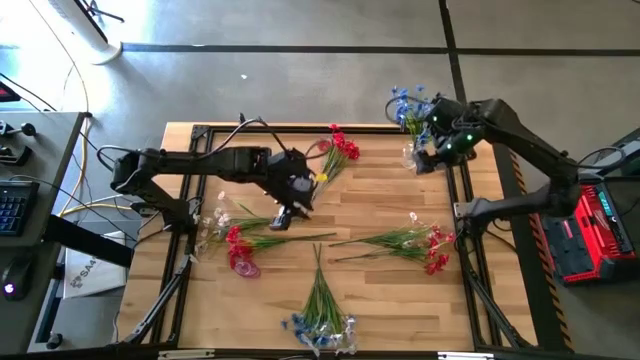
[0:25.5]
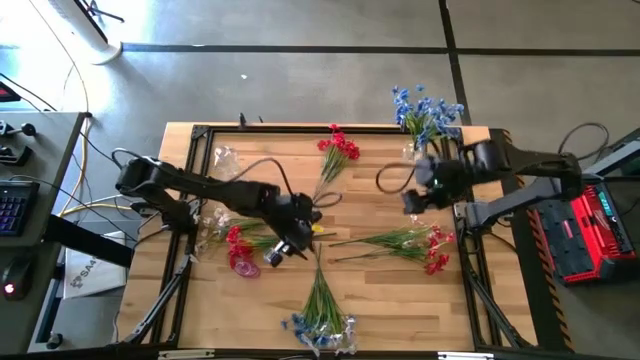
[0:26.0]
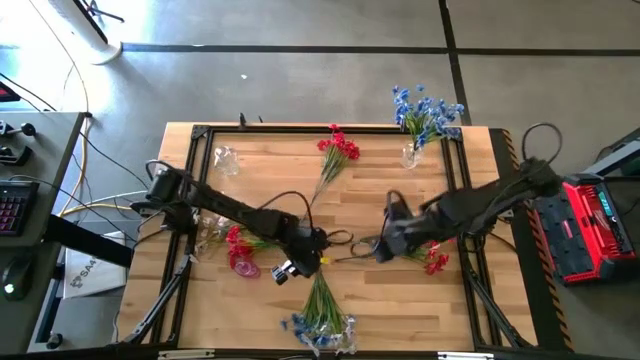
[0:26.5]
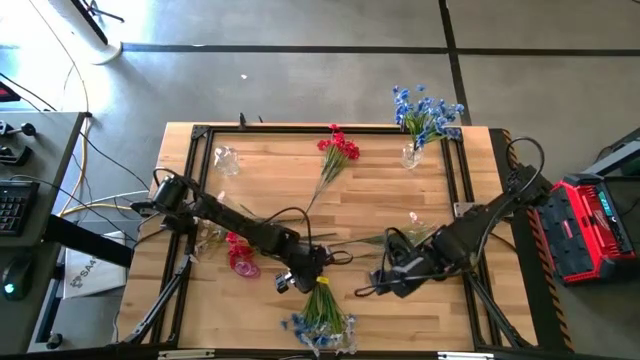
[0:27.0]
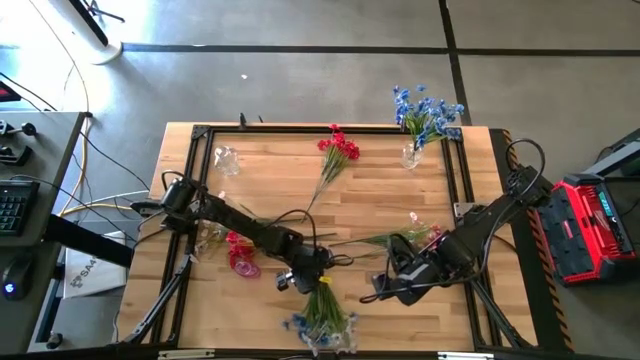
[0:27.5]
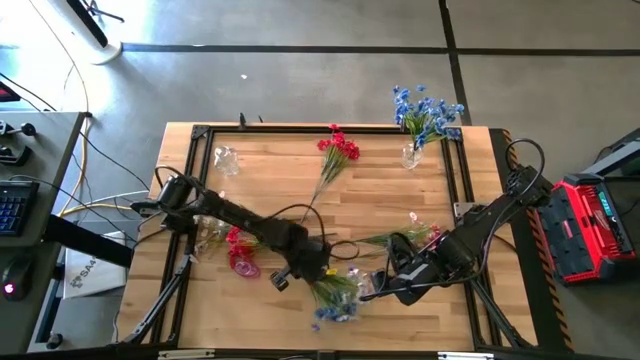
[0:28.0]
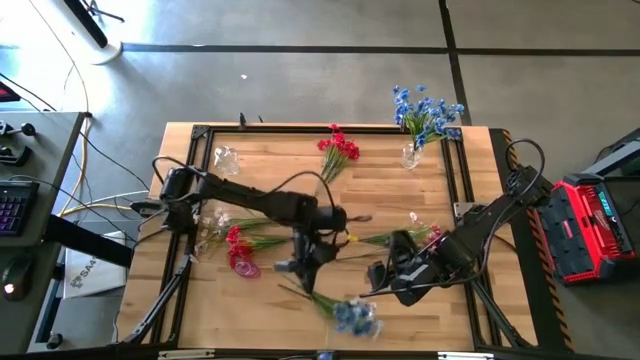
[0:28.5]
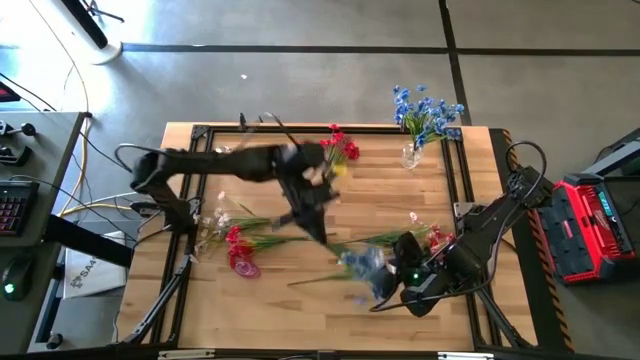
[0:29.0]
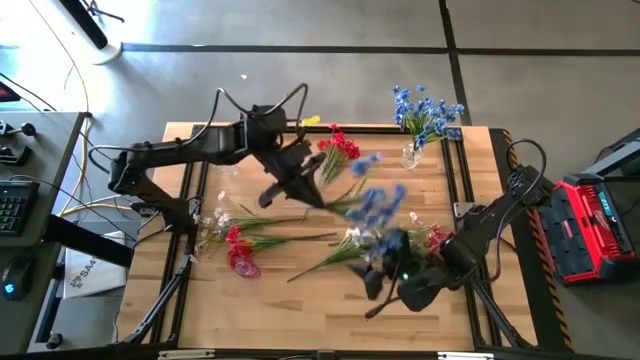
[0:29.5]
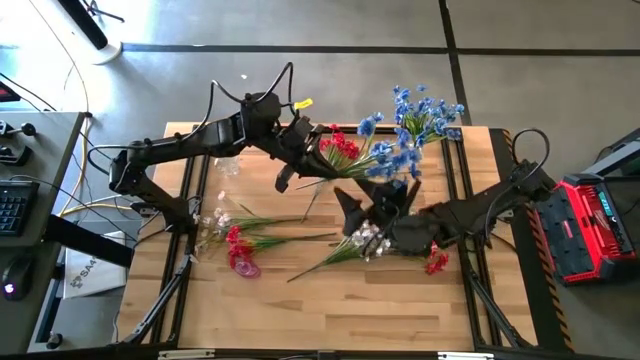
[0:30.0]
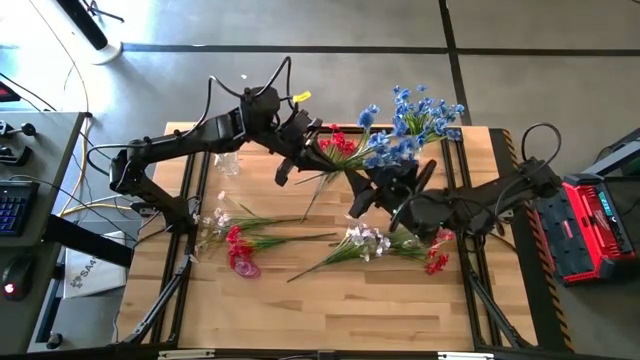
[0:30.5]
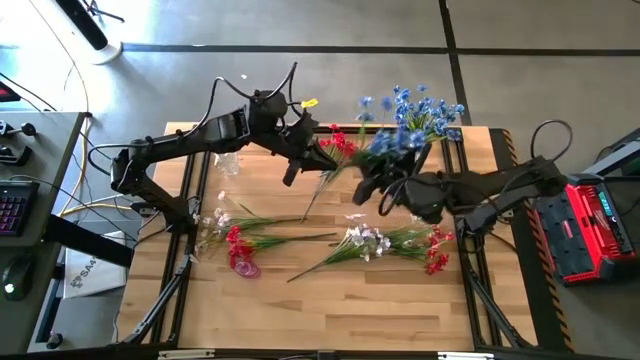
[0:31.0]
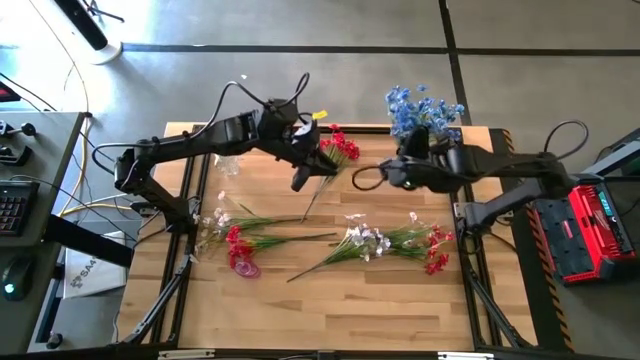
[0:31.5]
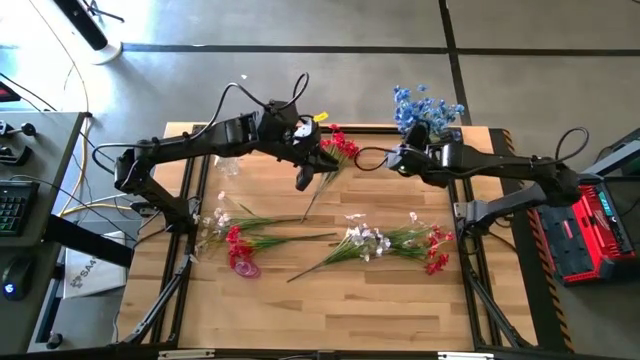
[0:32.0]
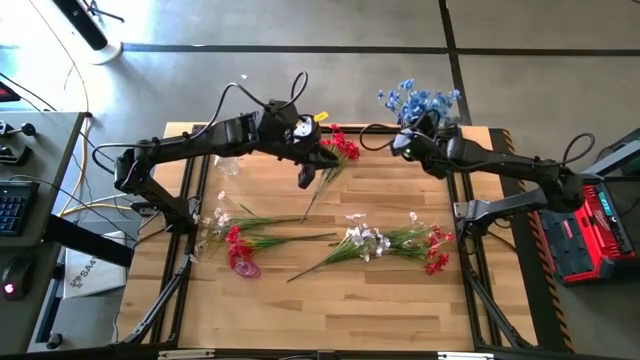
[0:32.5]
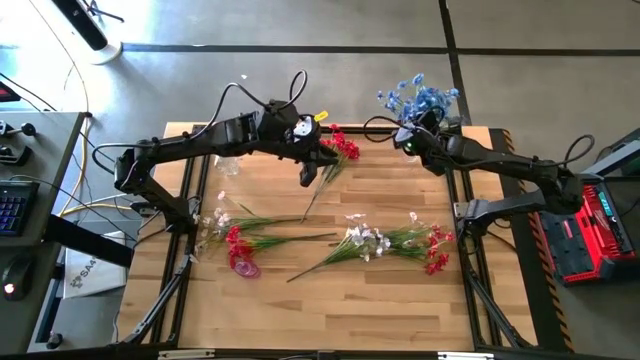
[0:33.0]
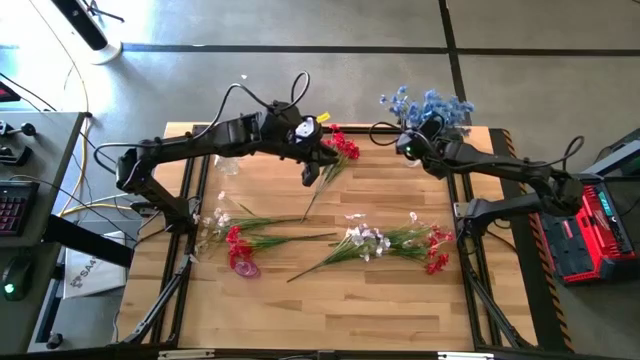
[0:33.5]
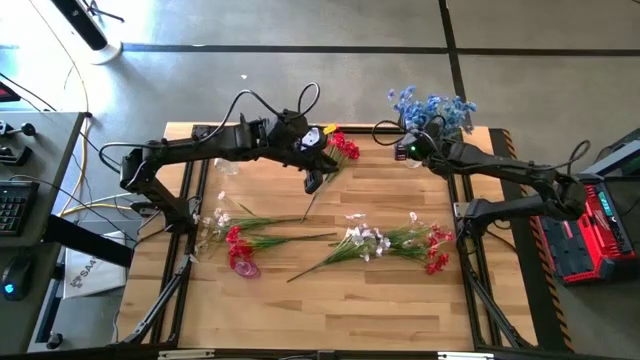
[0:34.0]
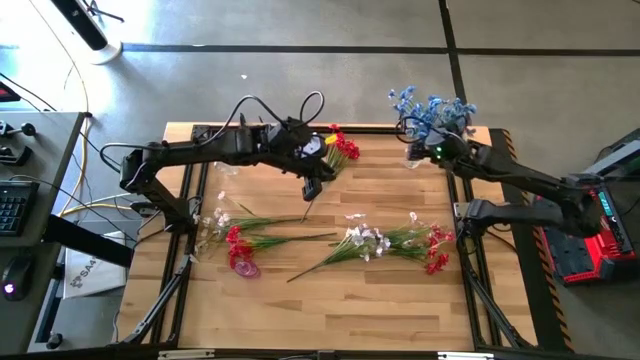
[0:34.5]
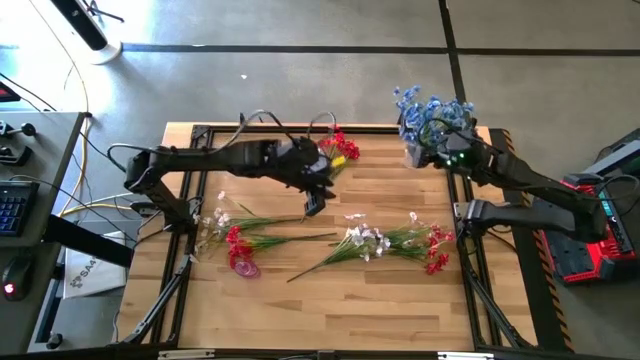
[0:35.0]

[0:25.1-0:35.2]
Task: Sort flowers into vase by color
Put the blue flowers into the right transparent vase

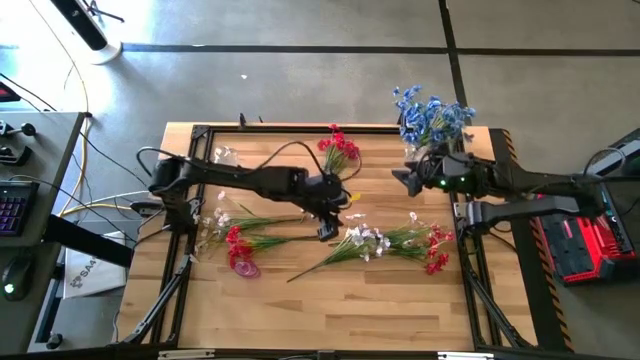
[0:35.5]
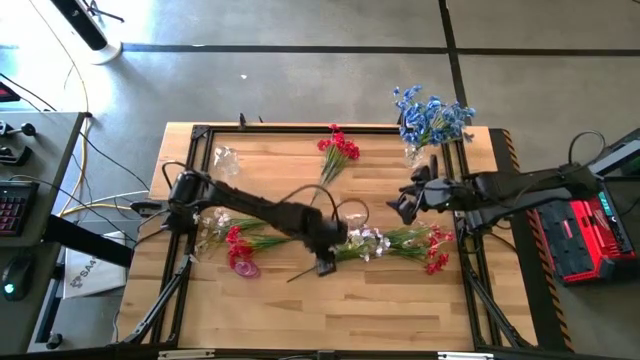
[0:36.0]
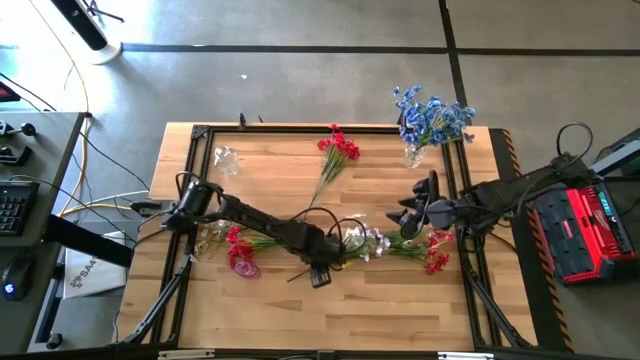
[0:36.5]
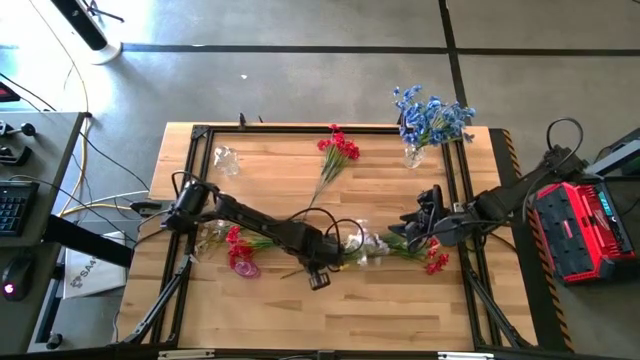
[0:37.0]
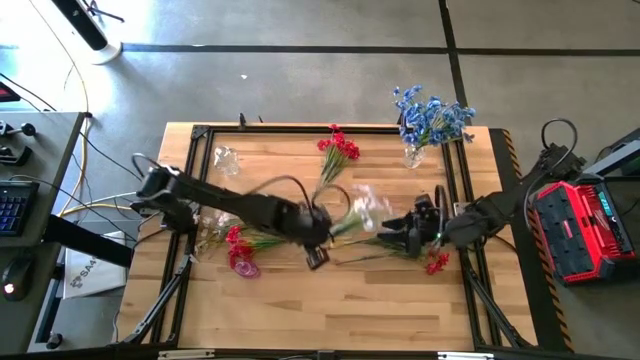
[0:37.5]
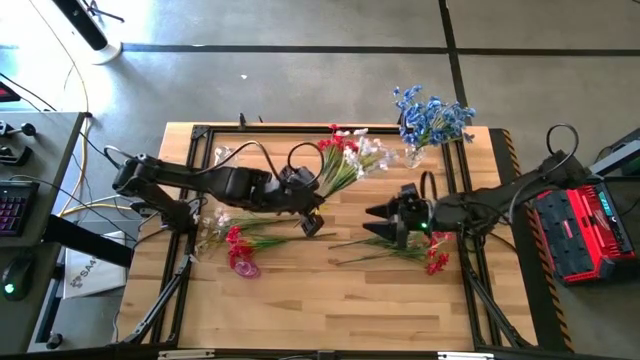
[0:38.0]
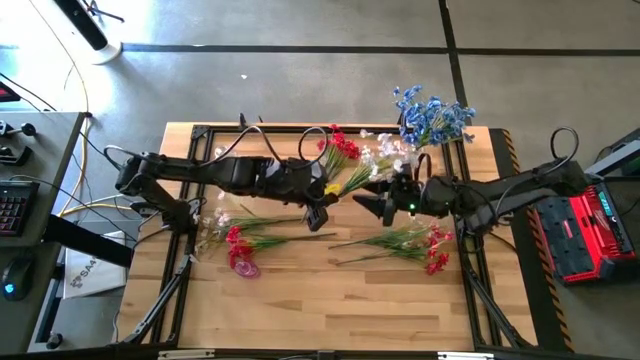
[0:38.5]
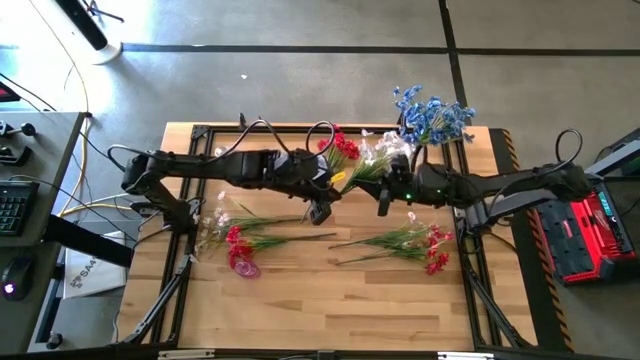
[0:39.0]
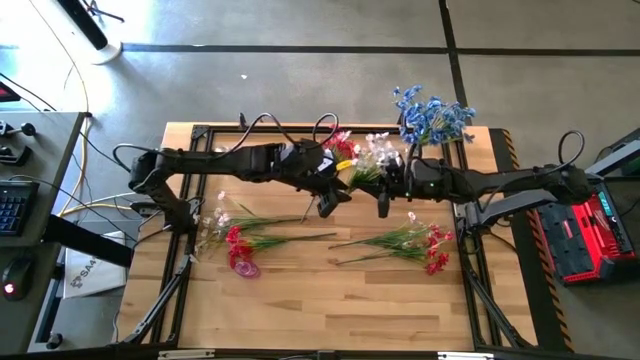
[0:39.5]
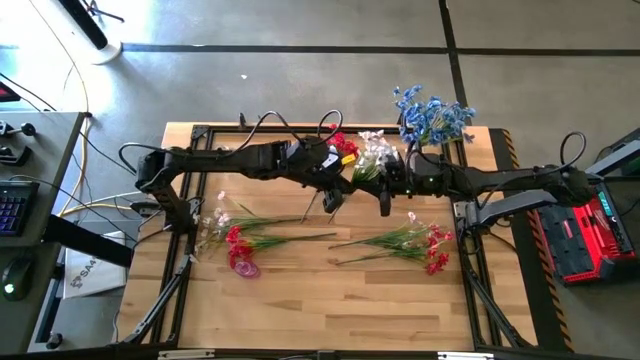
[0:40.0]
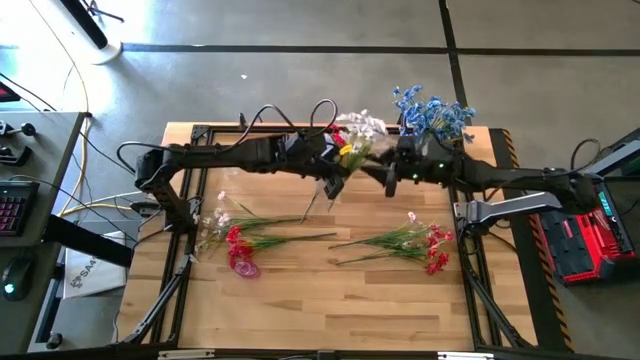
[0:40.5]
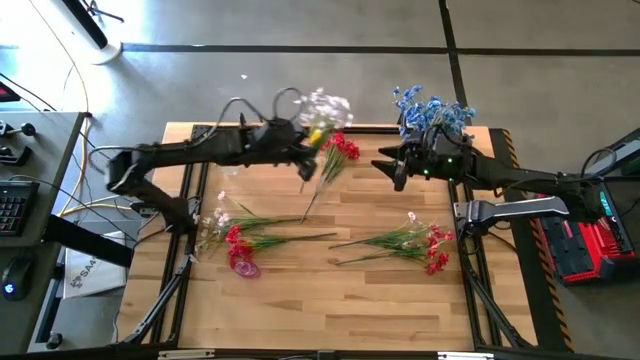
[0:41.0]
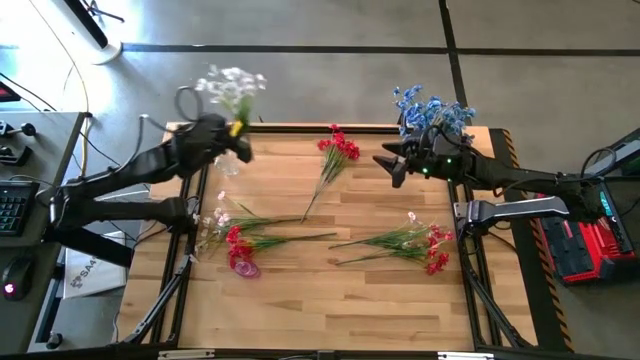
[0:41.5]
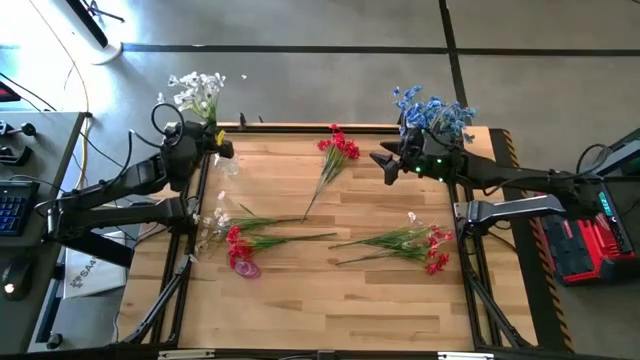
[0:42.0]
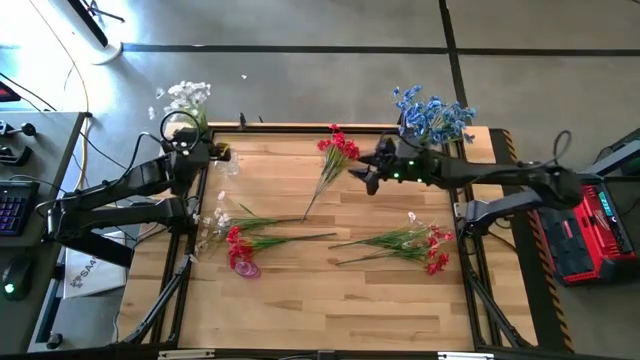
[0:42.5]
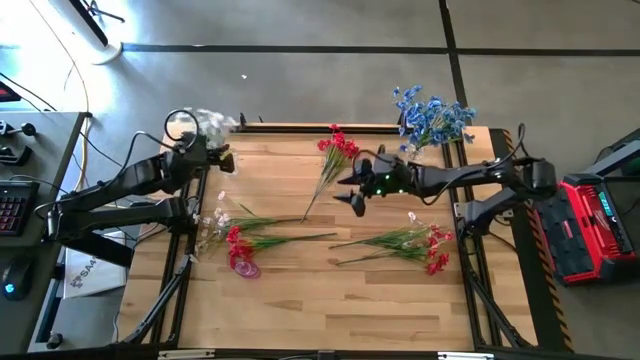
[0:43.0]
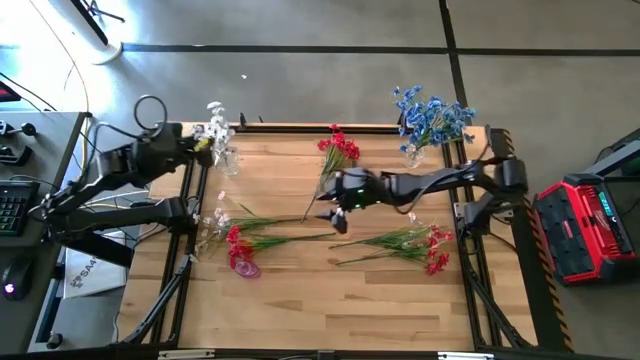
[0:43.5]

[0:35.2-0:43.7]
Put the middle white flowers into the left transparent vase

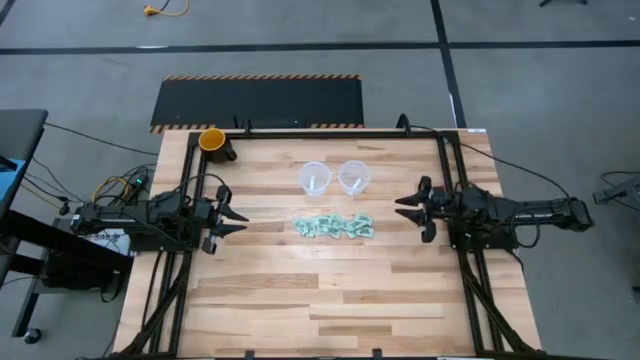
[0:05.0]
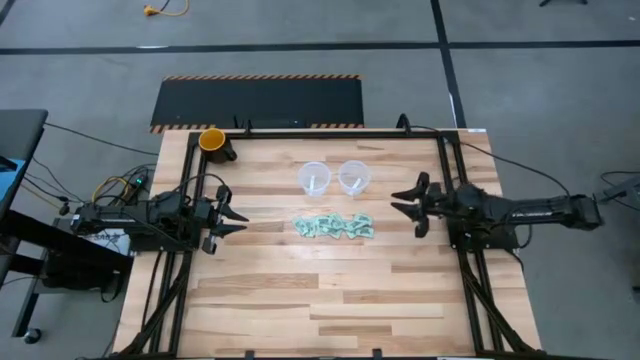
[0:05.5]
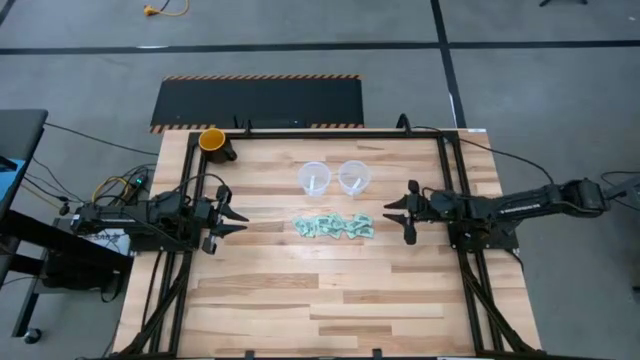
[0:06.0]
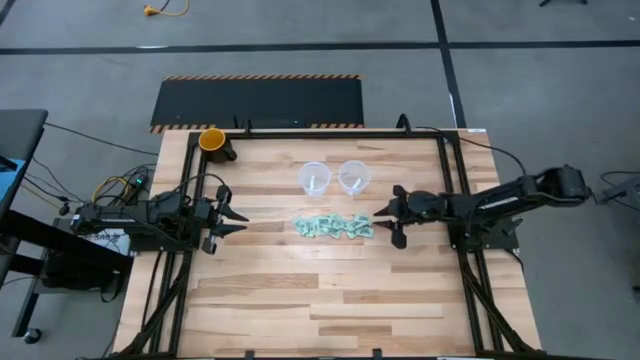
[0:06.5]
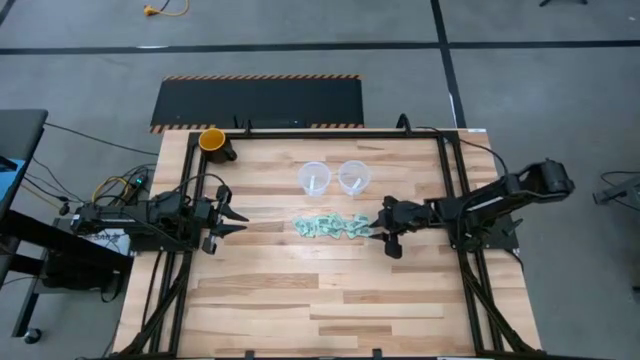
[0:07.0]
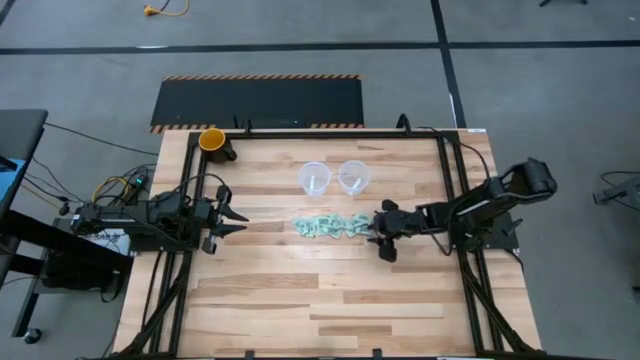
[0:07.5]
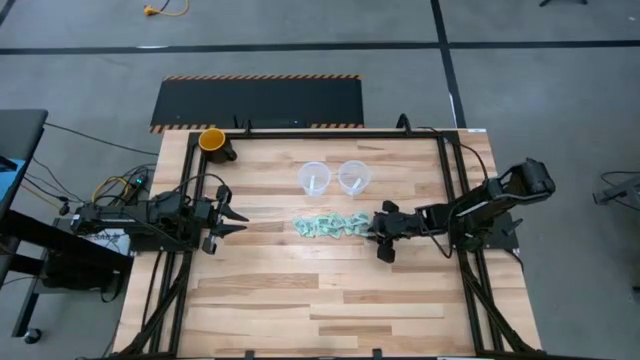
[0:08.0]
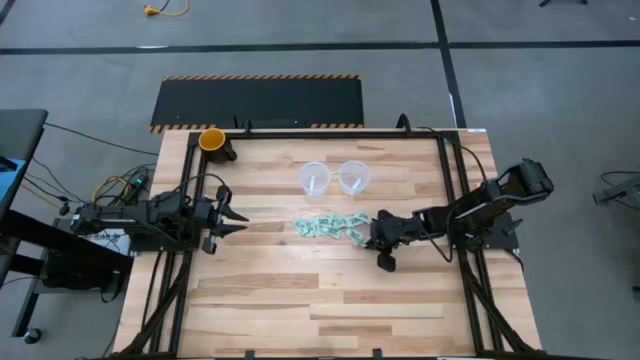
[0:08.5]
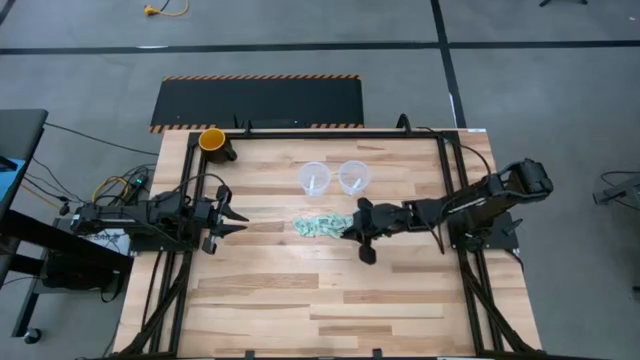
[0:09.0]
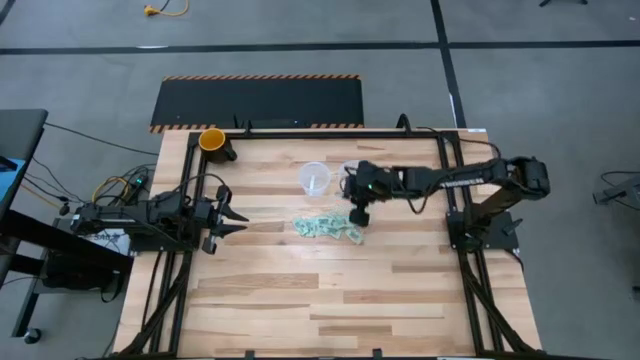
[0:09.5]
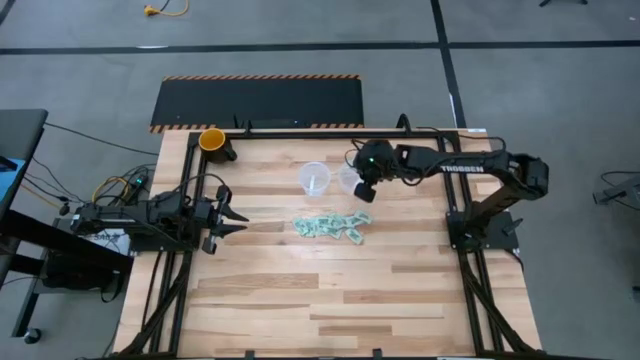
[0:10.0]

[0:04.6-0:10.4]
Task: Pick and place items into bin
Put the green stevia packet into the right transparent bin
